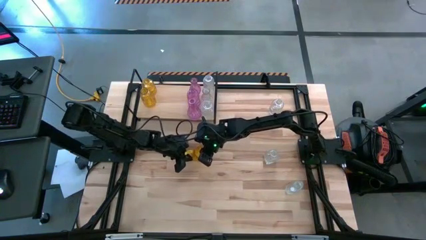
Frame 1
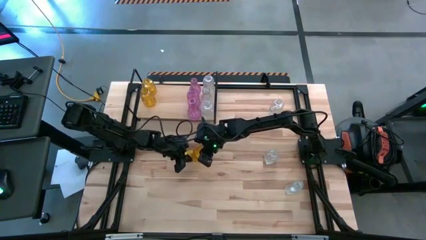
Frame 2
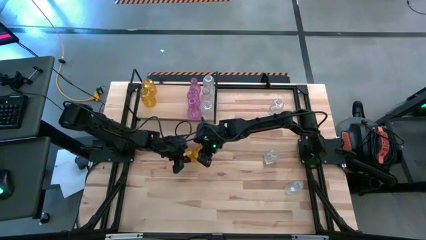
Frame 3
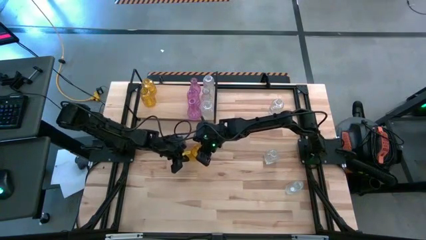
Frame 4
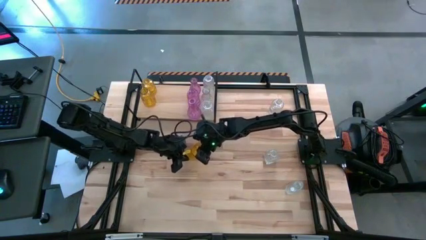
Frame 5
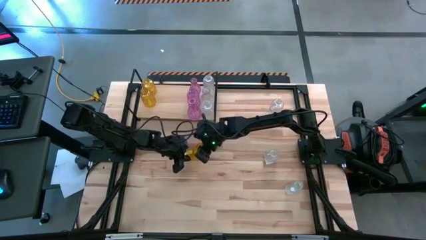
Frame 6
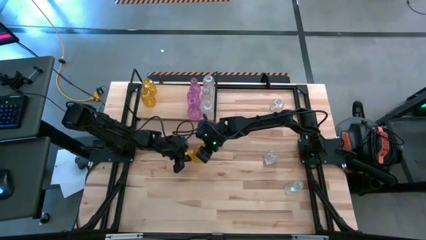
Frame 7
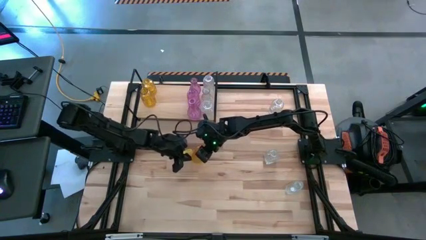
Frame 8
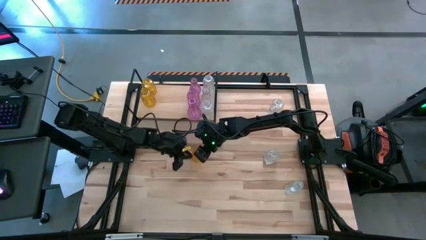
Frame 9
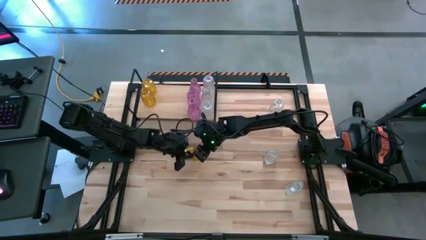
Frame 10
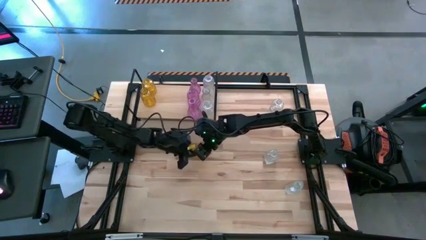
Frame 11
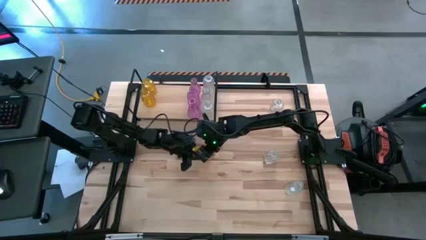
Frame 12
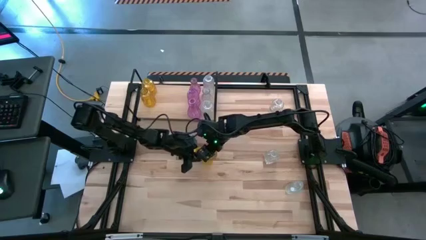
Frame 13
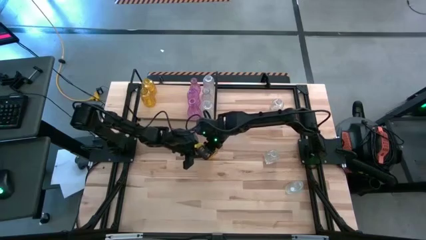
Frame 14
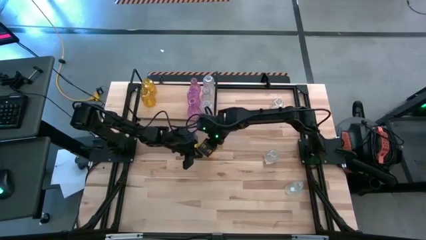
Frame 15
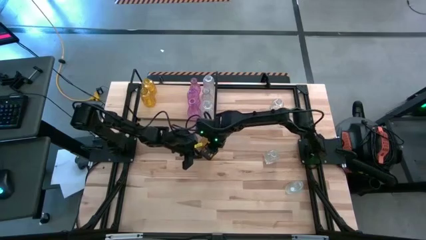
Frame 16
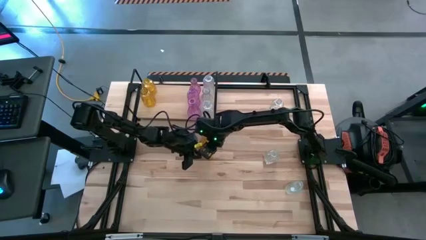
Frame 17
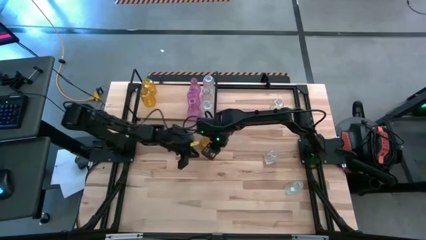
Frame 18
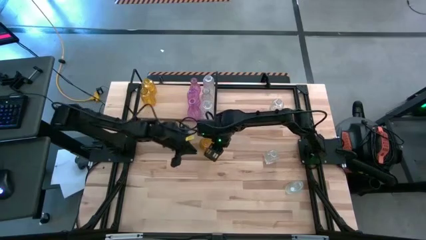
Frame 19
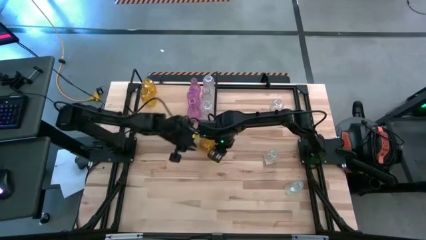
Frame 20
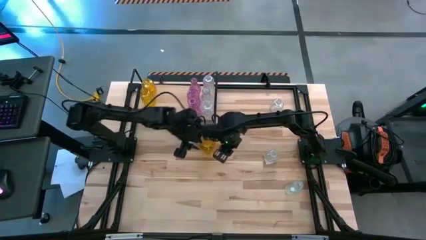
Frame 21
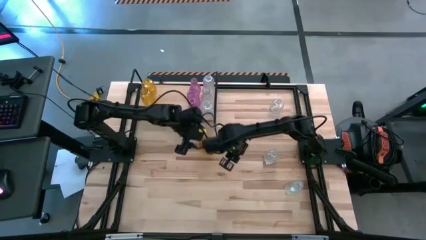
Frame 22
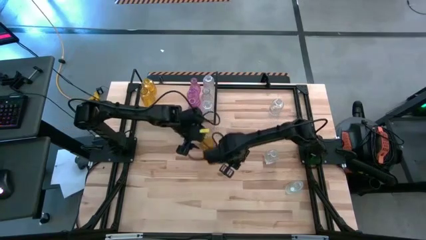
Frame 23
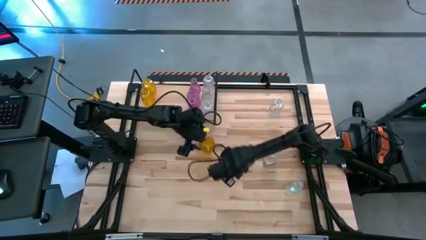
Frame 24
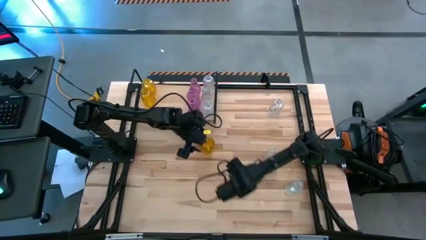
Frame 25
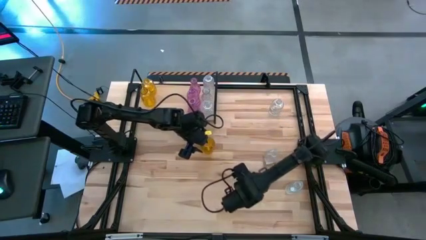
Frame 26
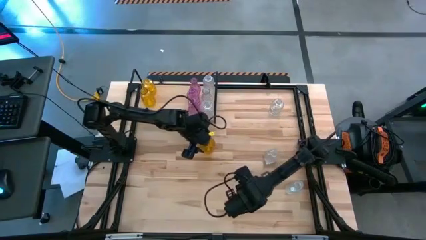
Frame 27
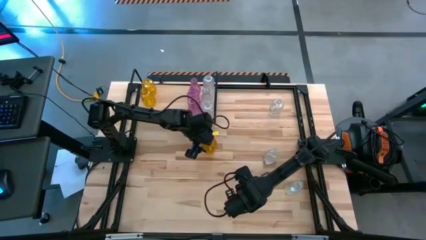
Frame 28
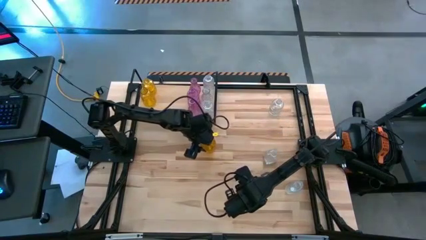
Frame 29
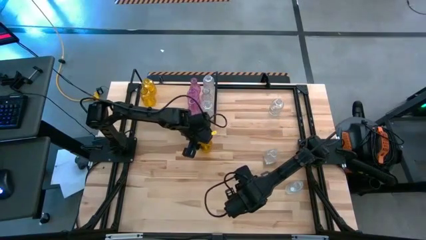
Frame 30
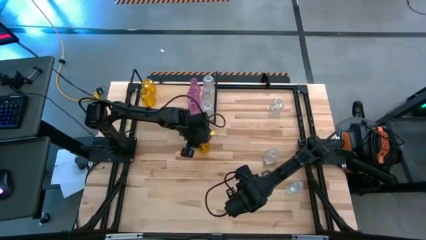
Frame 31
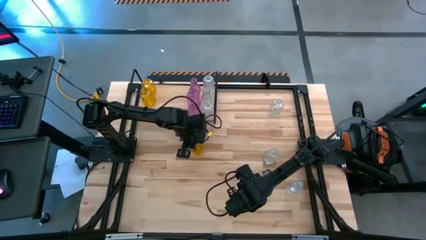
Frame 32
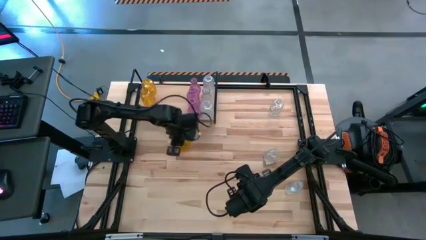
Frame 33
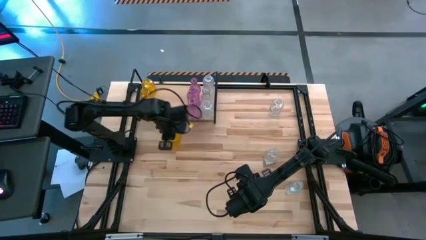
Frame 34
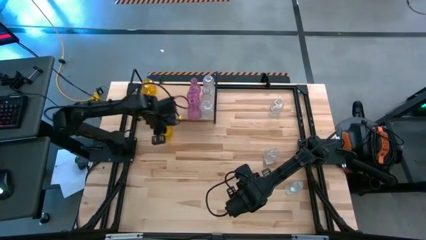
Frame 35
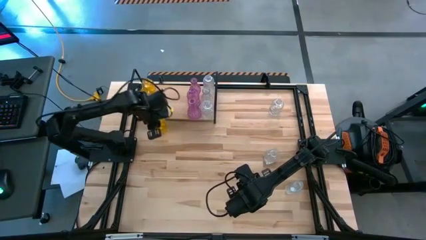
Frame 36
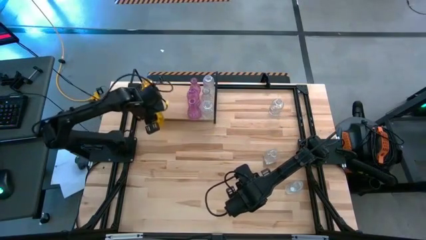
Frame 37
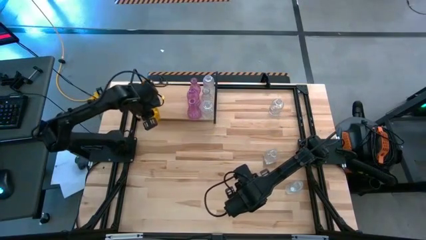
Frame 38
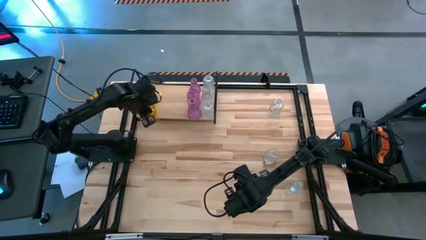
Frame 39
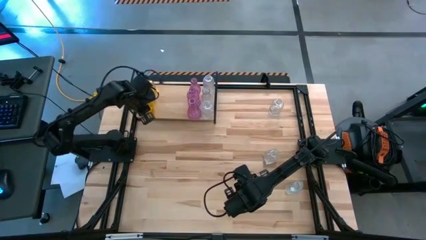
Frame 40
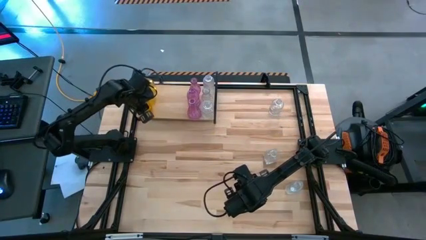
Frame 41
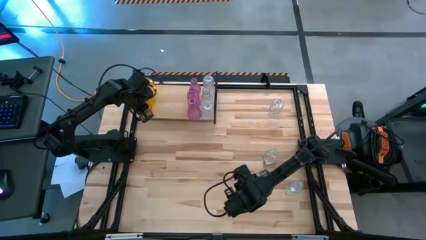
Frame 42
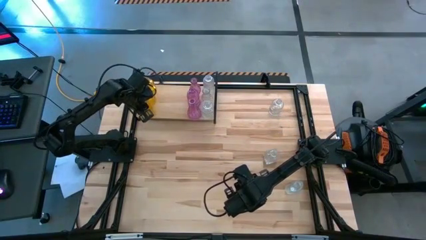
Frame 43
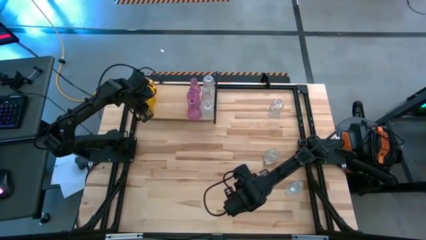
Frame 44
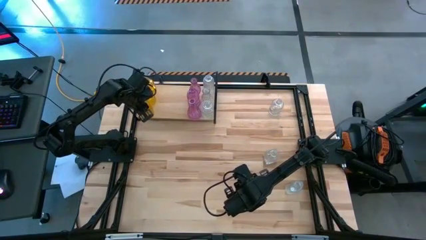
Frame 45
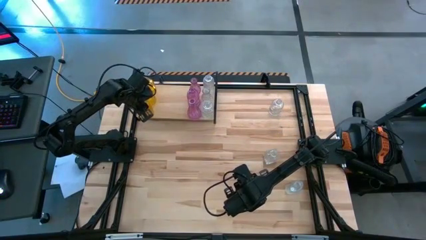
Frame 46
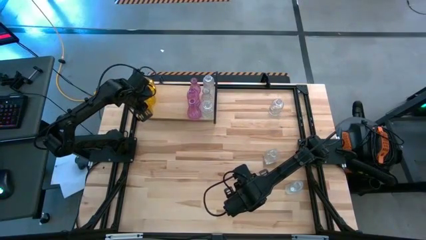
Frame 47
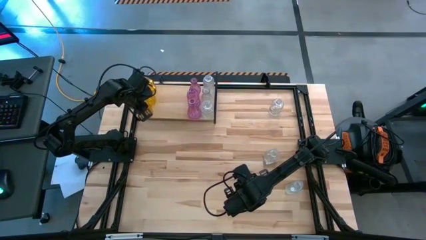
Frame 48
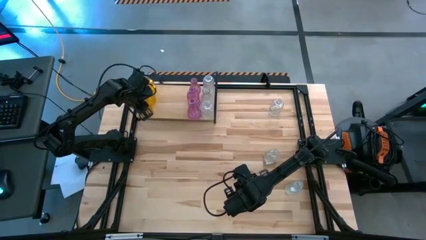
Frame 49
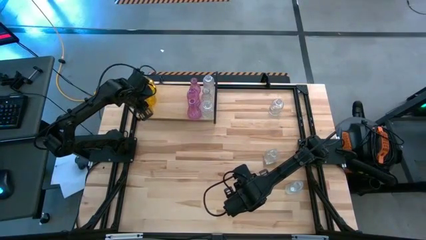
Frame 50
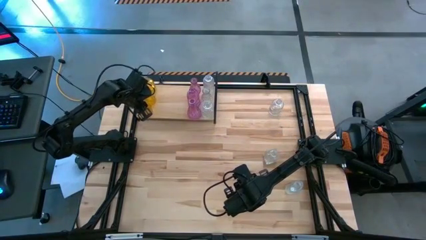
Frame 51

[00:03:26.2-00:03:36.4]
Task: sort vases onto shelf
Put the yellow vase on the shelf aligned with the other yellow vases

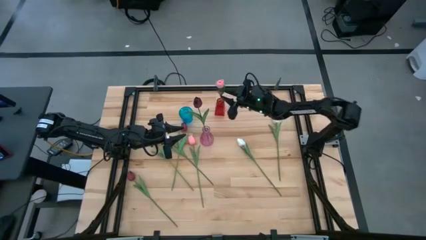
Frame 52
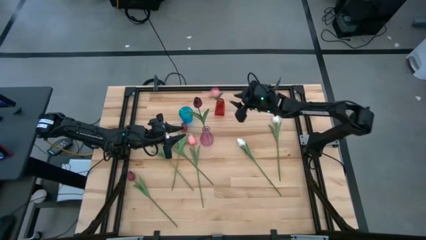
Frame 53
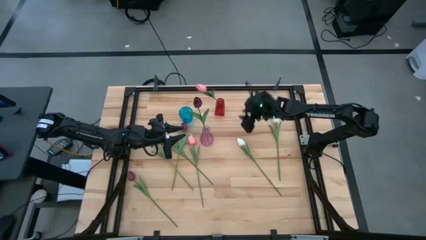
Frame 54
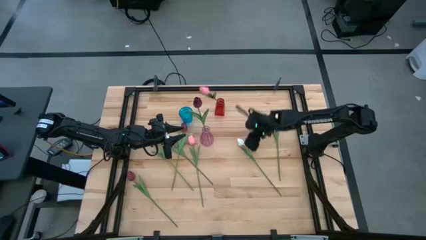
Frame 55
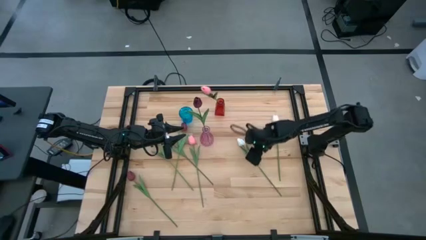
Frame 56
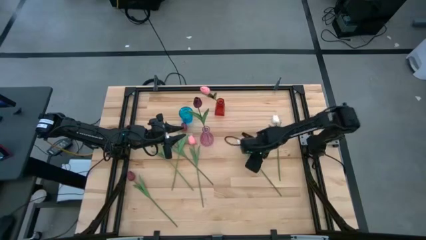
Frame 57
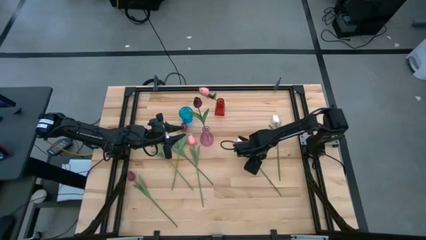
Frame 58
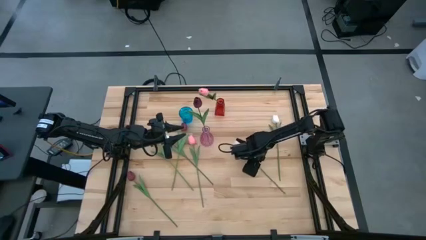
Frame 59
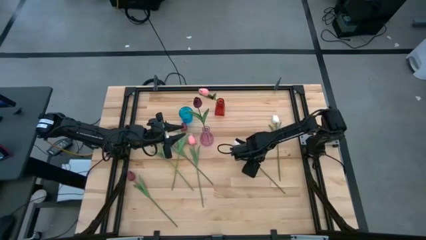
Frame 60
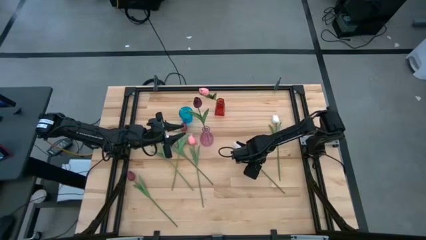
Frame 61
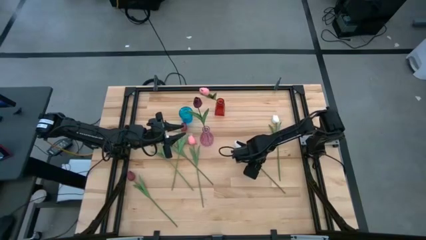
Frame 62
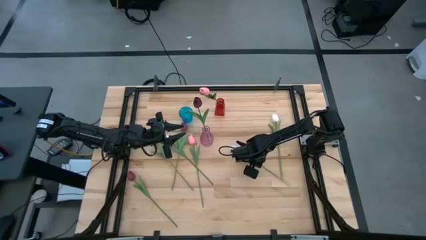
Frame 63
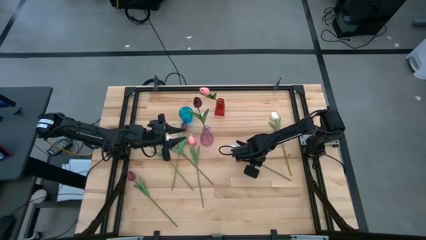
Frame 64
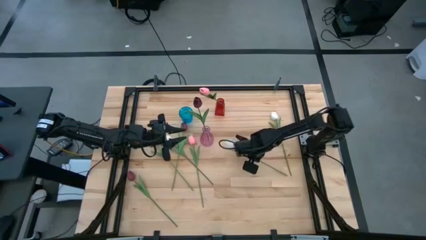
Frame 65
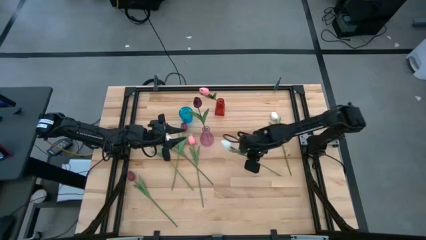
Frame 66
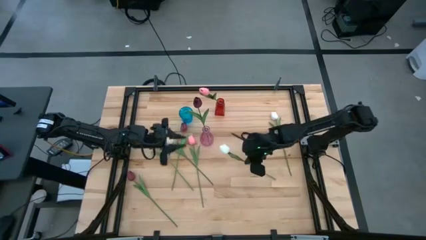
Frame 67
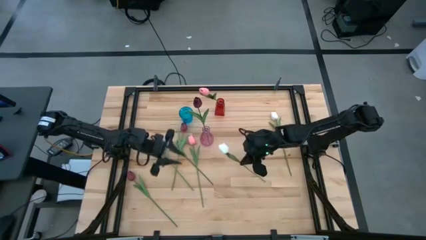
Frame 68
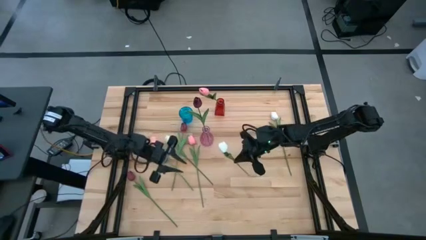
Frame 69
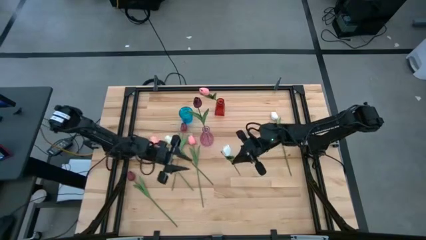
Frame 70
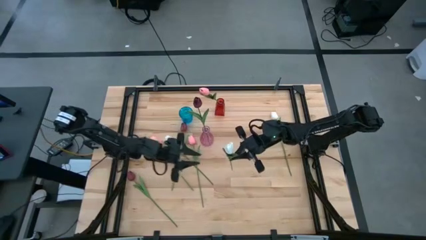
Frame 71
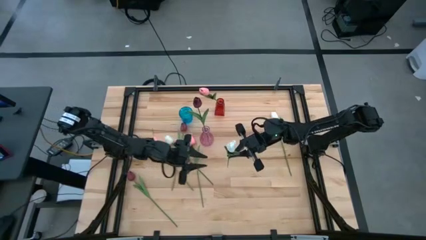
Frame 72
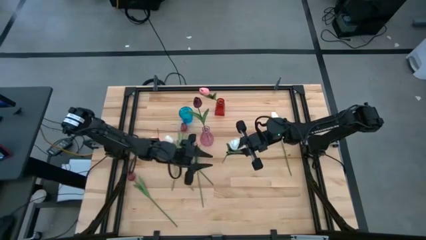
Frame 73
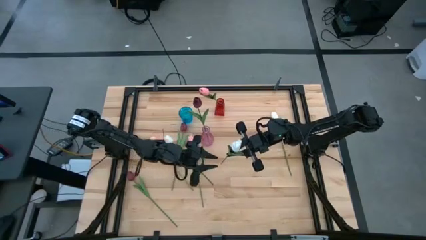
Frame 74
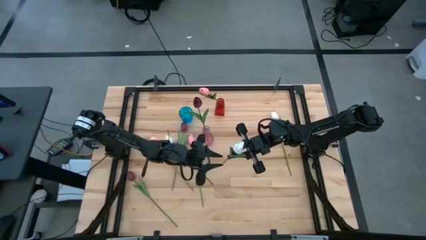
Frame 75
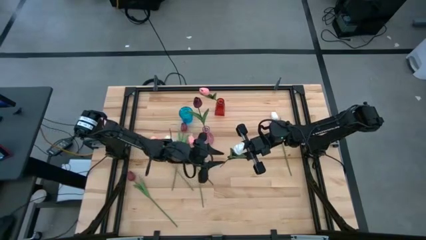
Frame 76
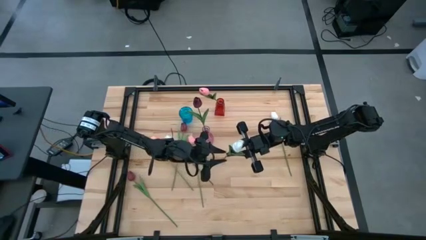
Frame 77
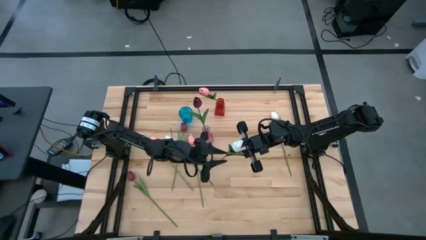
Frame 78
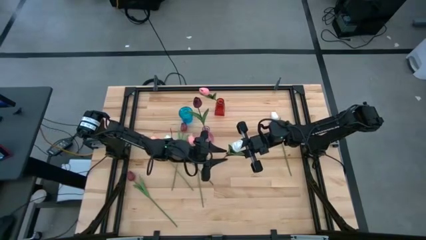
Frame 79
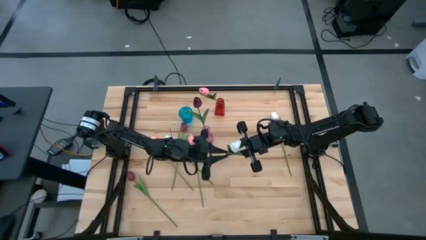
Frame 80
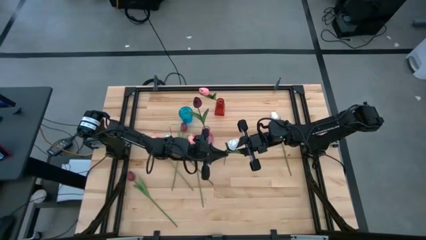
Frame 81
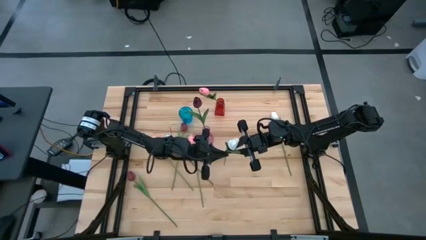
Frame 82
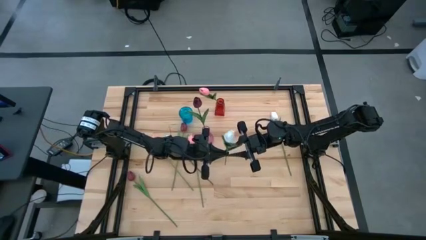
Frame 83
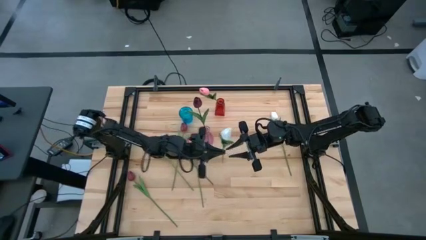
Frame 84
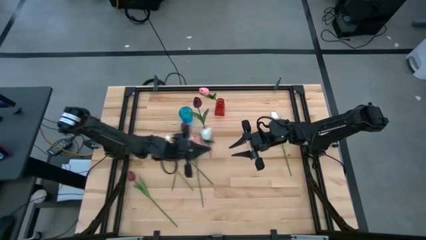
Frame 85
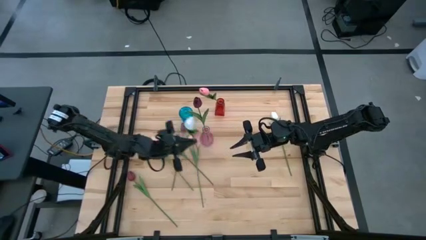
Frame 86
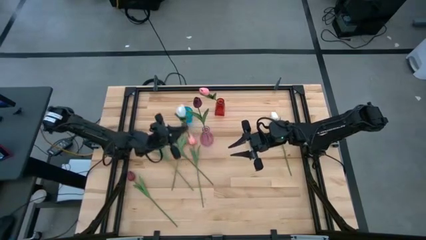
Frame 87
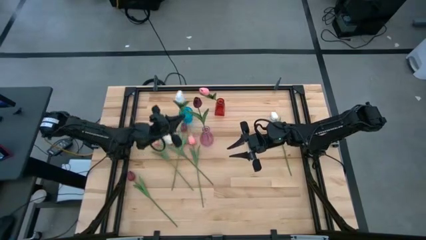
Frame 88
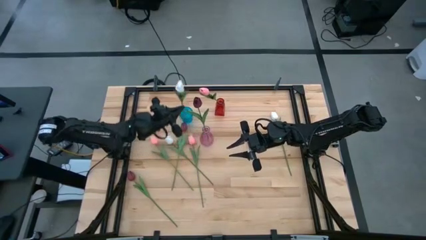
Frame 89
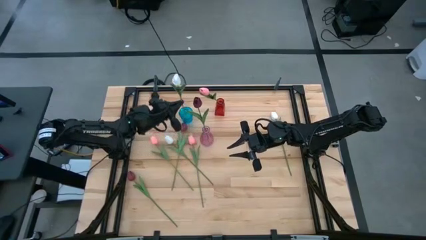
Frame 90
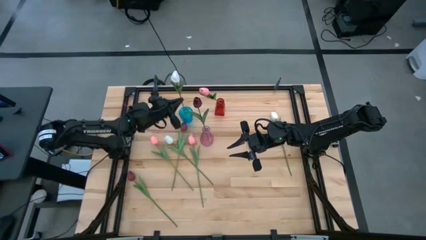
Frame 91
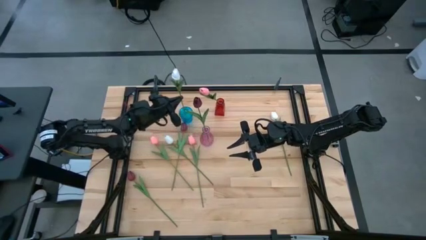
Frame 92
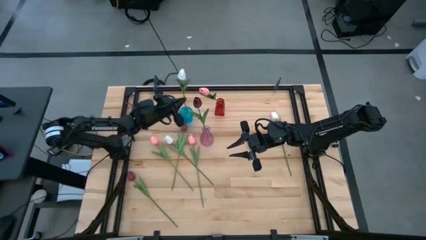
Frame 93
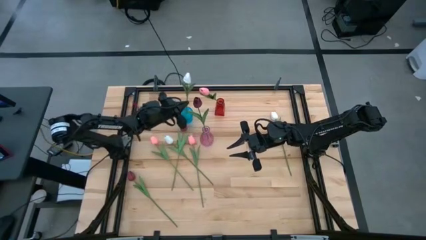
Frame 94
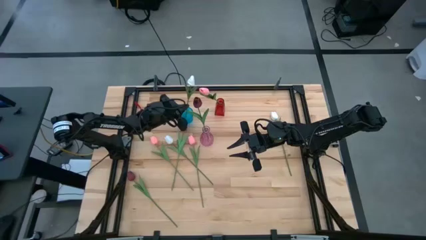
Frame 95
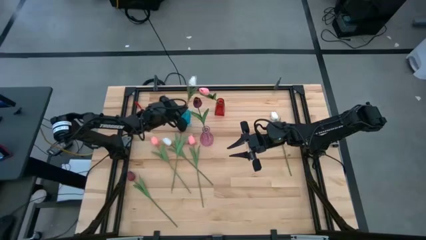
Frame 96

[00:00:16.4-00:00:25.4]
Task: Sort flowers into vase by color
Put the center white flower into the blue vase
